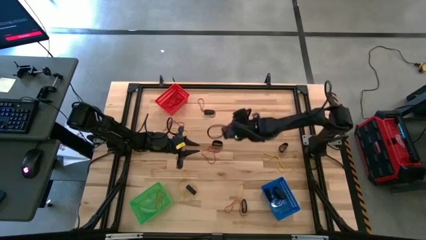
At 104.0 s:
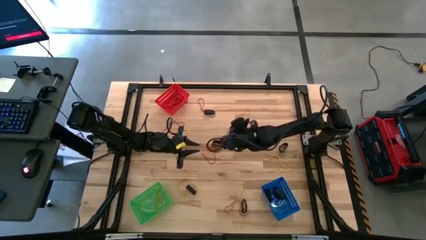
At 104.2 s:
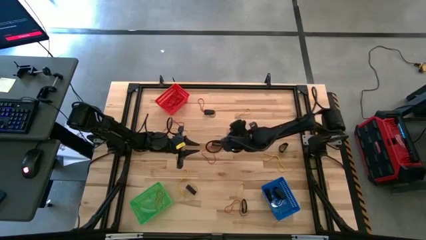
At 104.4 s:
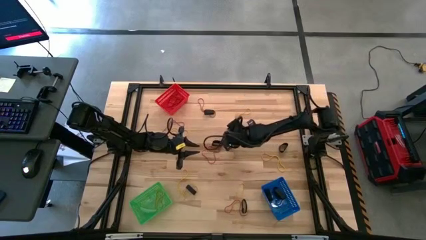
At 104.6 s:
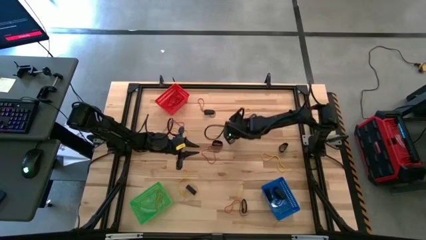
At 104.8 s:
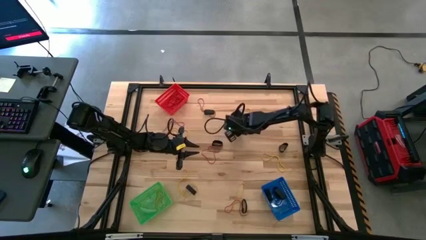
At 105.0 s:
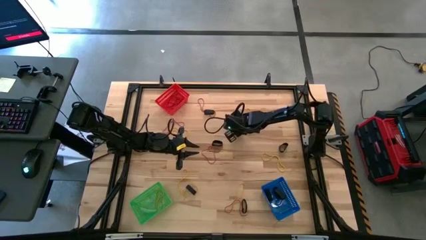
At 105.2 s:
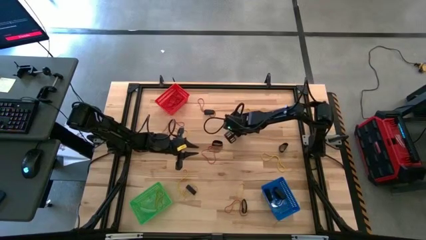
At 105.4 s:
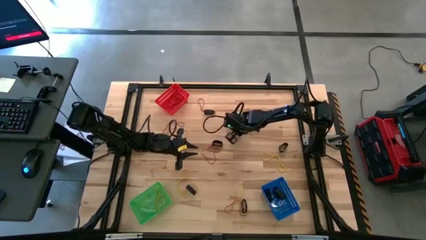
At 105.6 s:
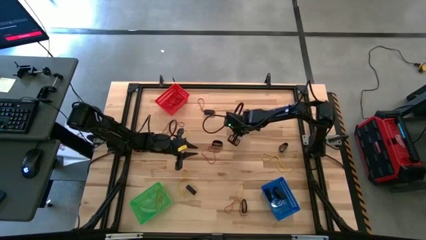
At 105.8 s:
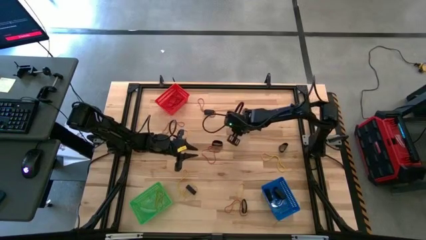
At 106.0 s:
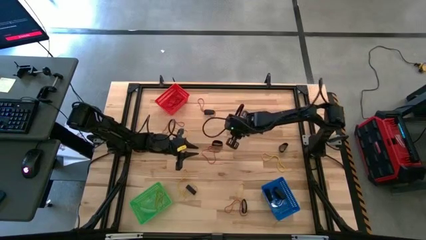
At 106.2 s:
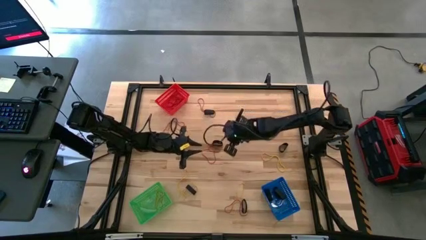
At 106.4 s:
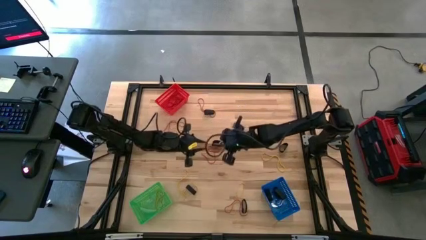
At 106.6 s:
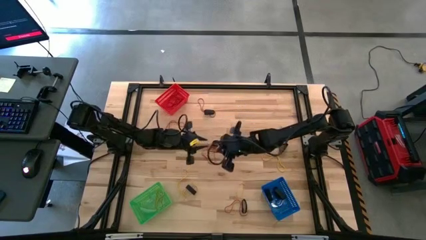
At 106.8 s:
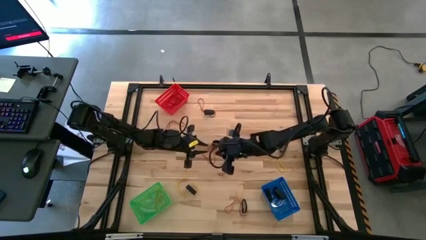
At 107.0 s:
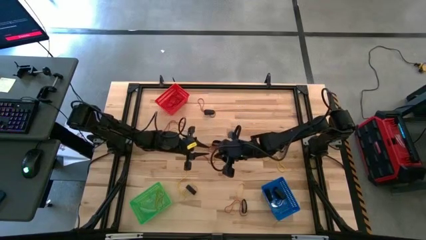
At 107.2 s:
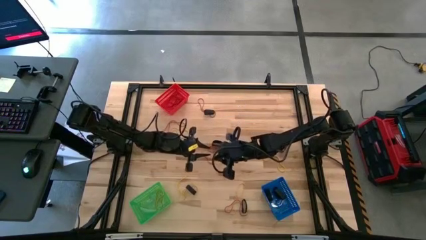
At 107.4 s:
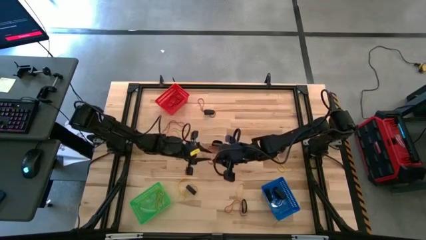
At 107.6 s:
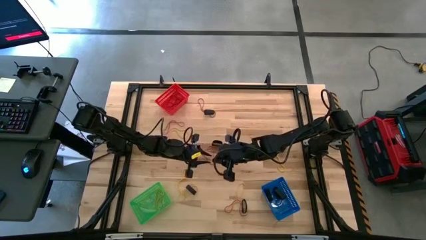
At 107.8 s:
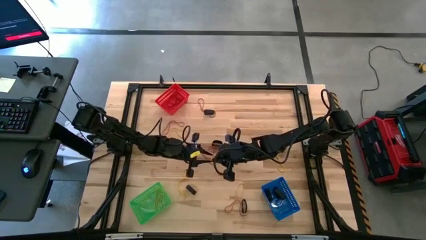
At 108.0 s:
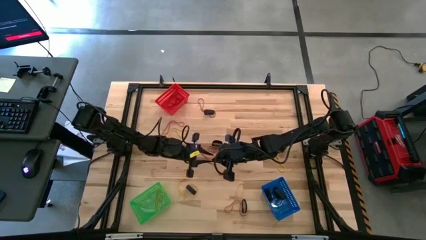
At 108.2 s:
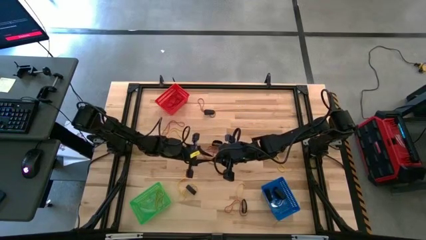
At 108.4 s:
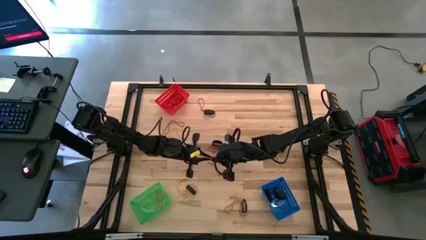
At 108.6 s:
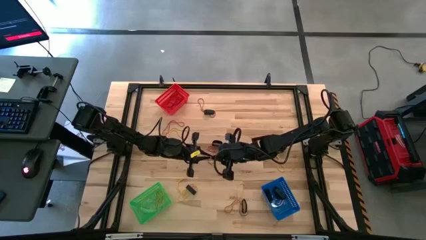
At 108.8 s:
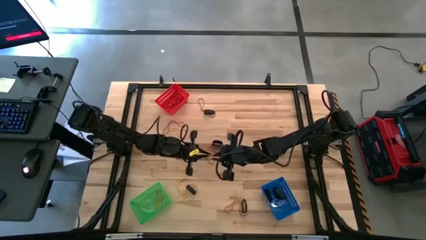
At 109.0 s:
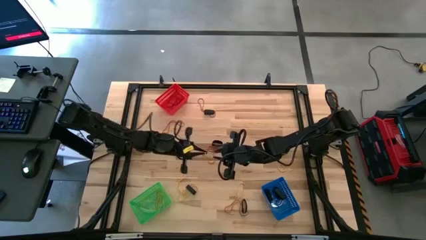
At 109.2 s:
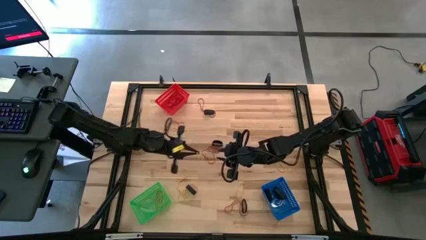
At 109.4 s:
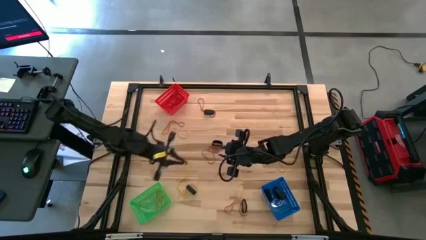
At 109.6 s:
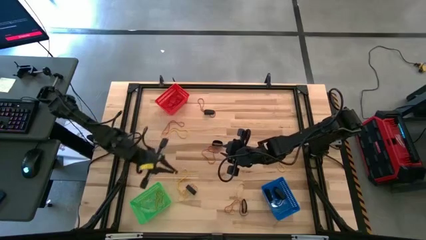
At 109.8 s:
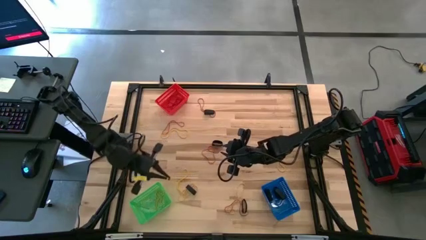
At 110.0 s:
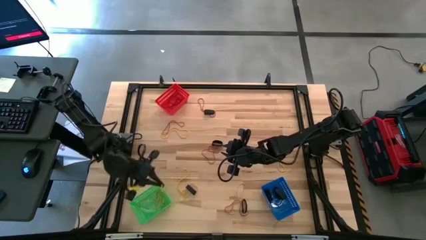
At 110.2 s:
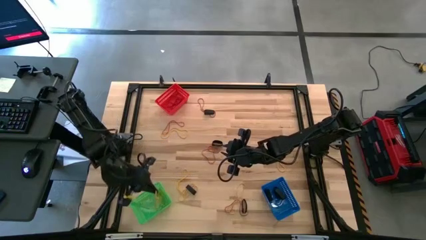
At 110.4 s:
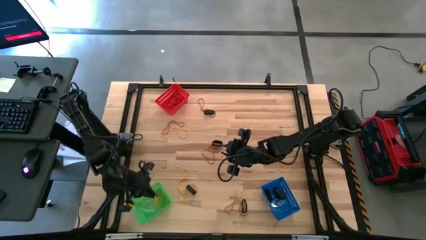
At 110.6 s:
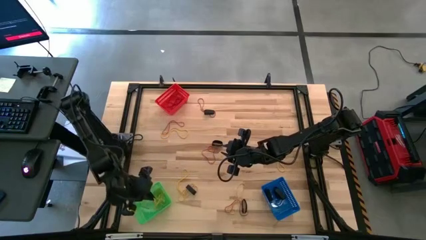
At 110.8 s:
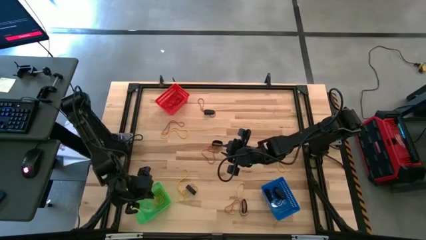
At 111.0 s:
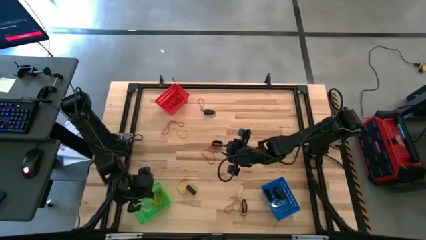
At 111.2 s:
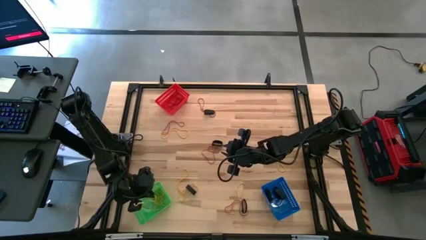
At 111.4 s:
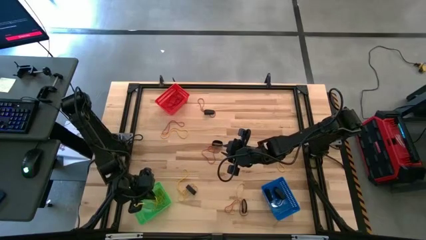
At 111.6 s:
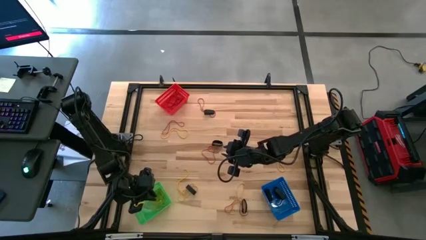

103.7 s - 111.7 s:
Task: Sort rubber bands into baskets
Put the yellow rubber band into the green basket

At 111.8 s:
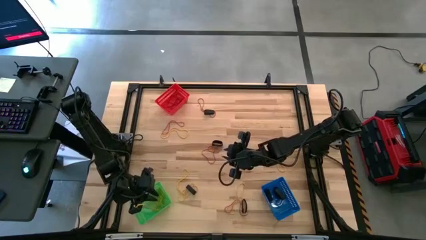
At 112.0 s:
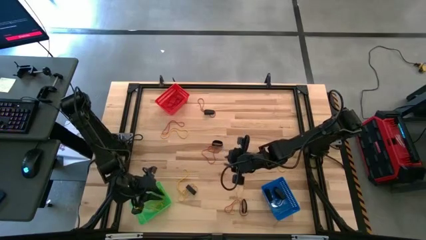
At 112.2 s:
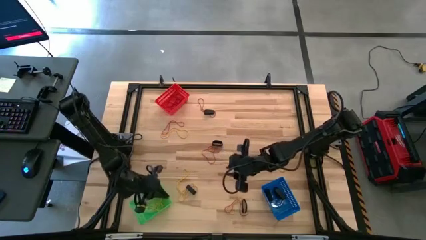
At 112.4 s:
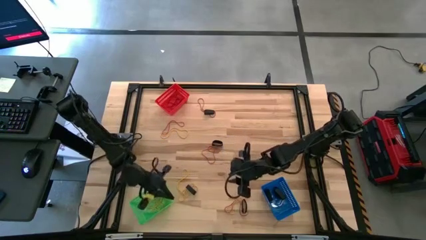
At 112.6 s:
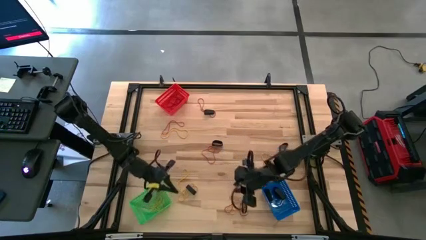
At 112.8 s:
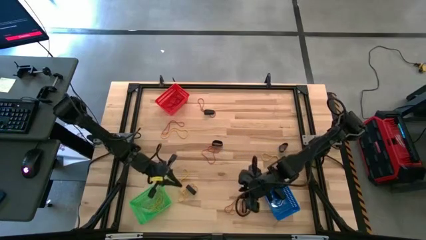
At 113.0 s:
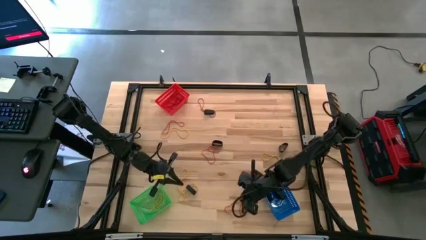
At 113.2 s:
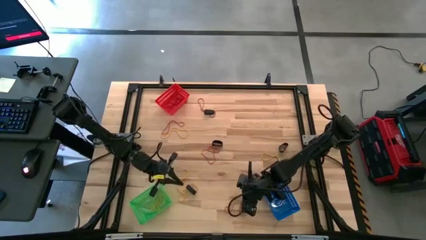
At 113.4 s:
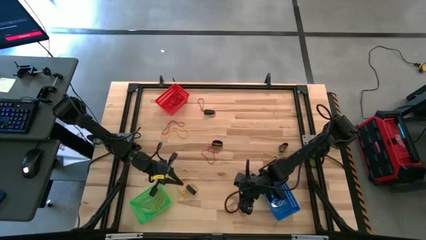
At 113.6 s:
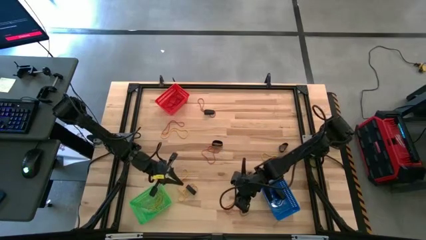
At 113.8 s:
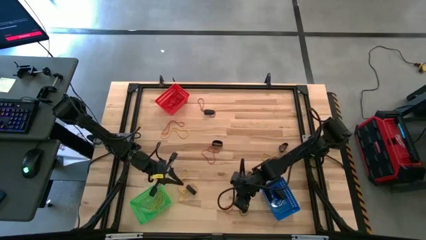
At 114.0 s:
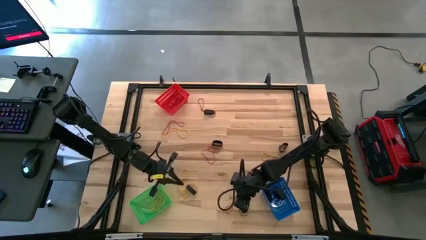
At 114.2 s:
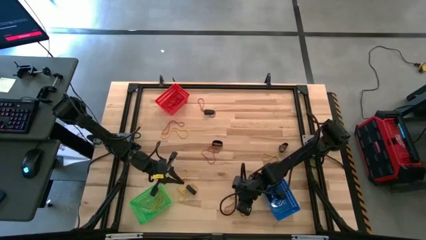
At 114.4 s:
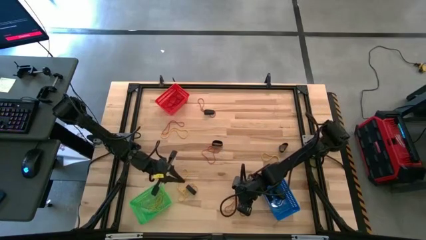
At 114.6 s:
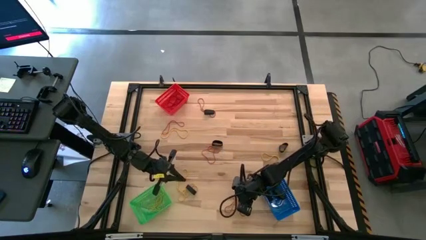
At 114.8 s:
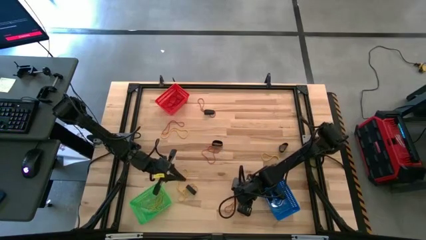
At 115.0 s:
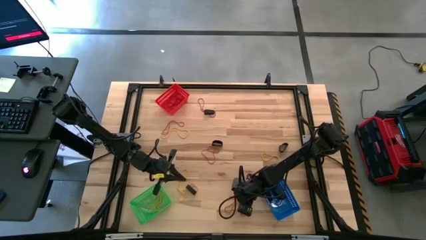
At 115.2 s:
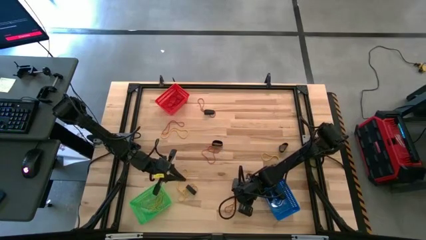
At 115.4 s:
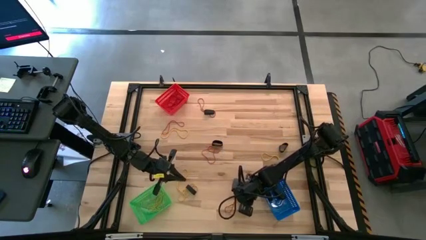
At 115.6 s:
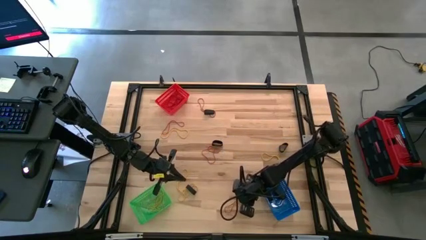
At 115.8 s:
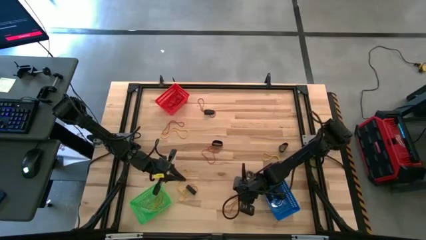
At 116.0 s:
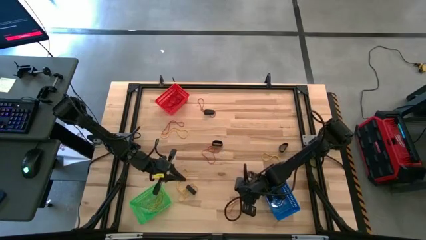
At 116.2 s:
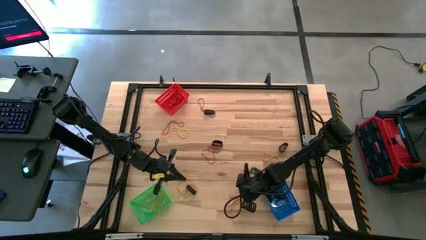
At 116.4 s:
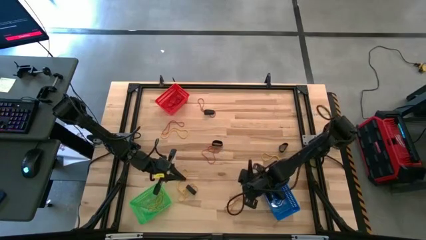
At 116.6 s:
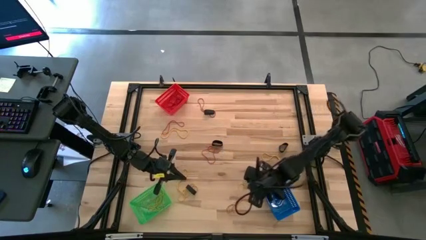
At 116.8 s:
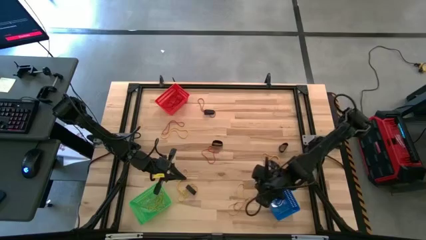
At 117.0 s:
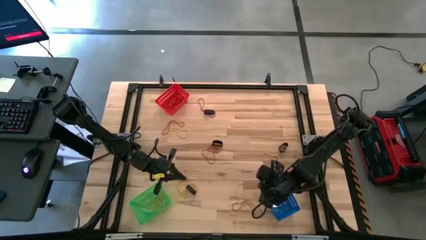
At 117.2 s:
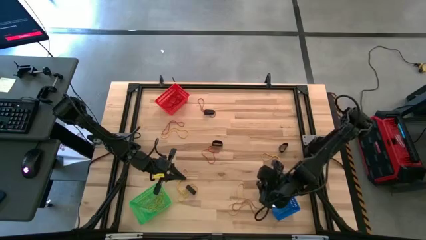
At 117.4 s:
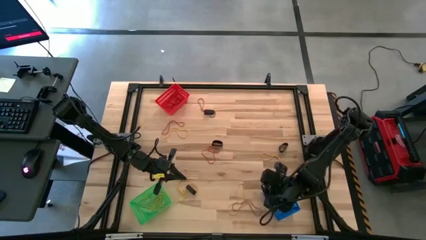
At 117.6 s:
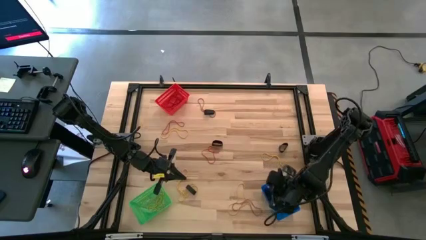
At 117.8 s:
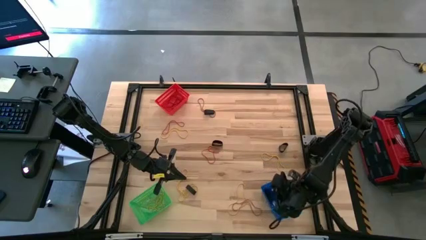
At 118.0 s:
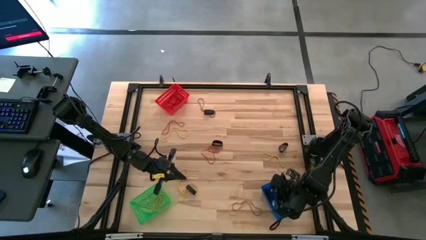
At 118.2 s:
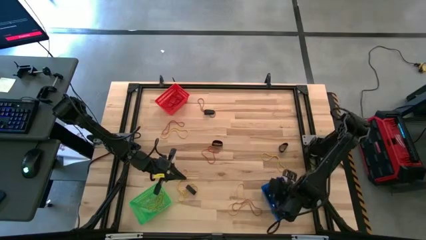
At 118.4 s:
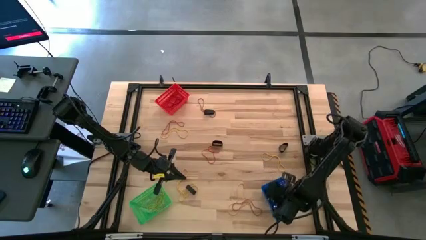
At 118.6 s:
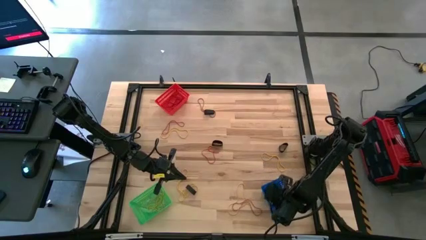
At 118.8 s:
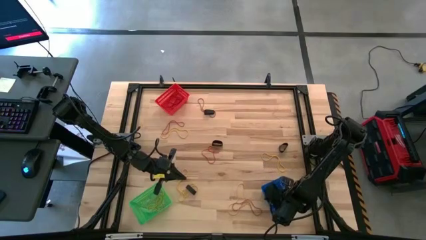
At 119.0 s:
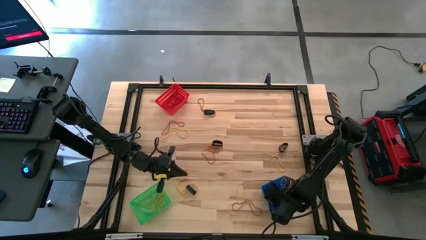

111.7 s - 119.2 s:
Put the black rubber band into the blue basket
